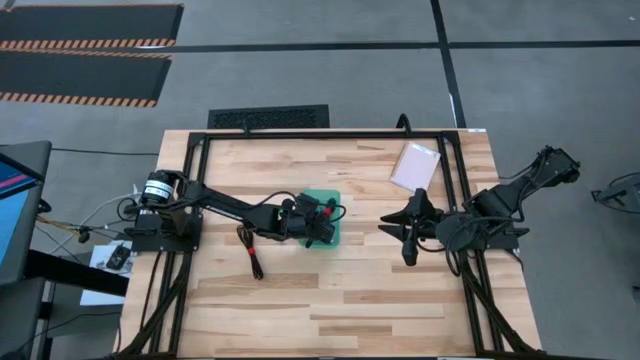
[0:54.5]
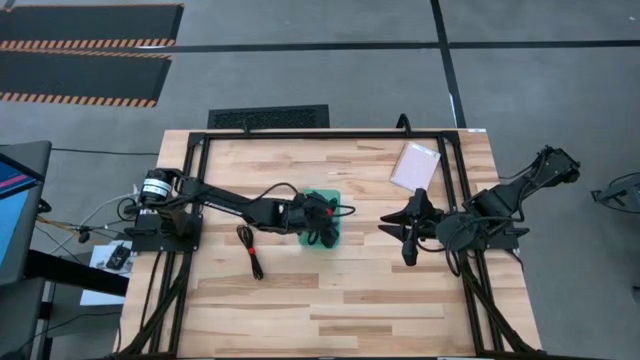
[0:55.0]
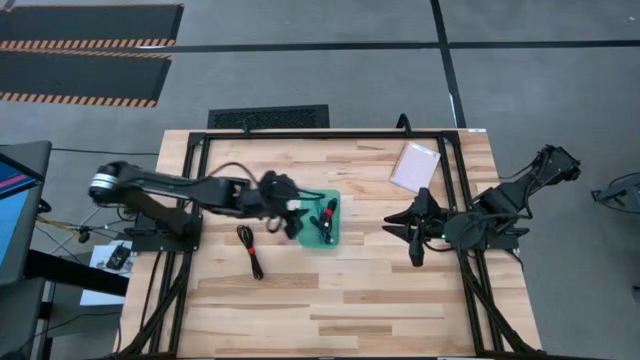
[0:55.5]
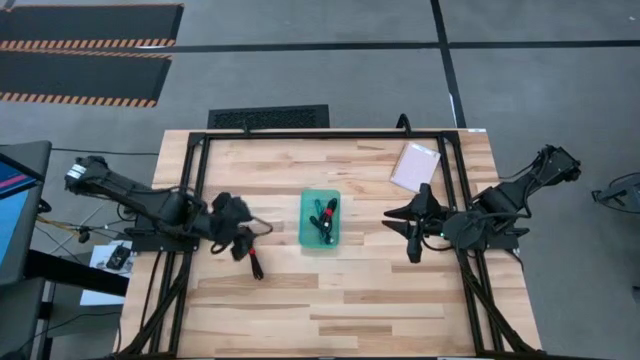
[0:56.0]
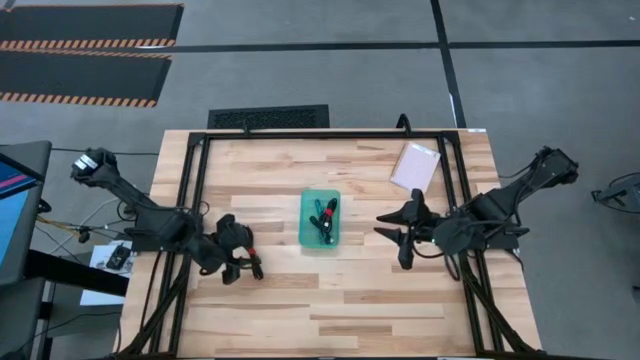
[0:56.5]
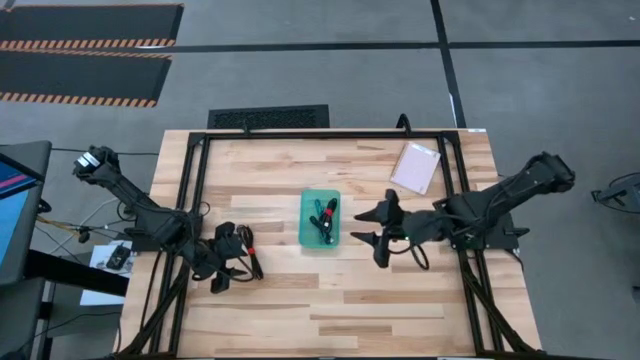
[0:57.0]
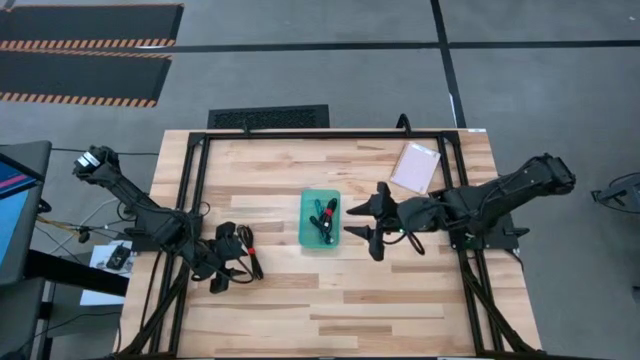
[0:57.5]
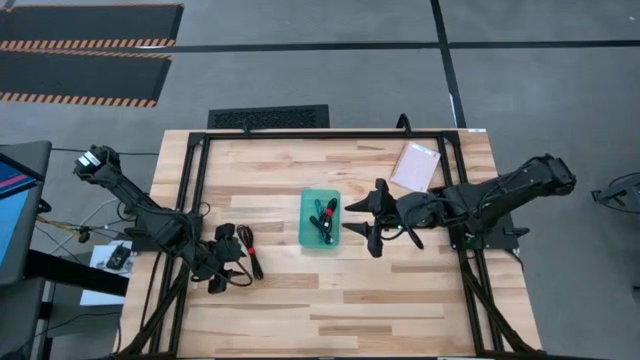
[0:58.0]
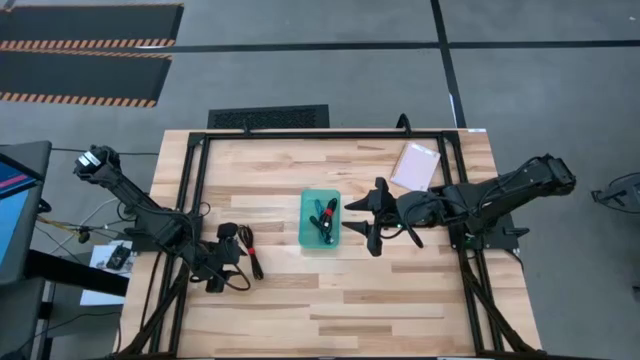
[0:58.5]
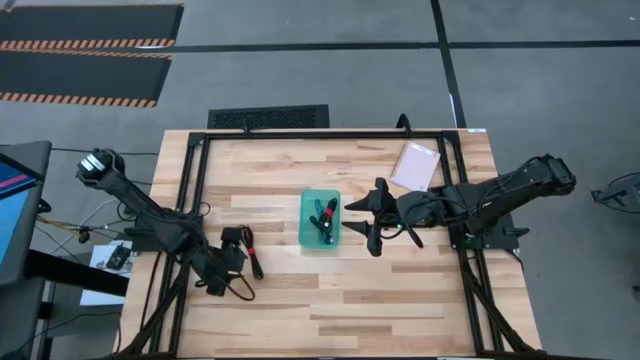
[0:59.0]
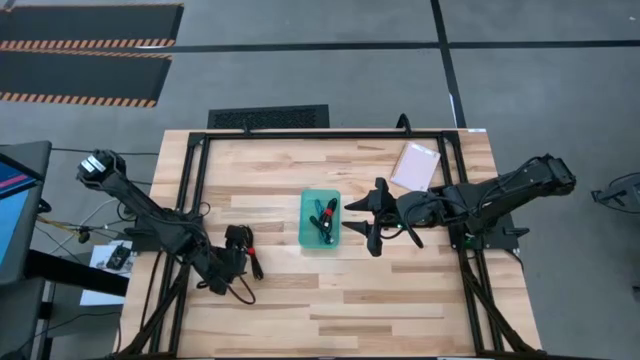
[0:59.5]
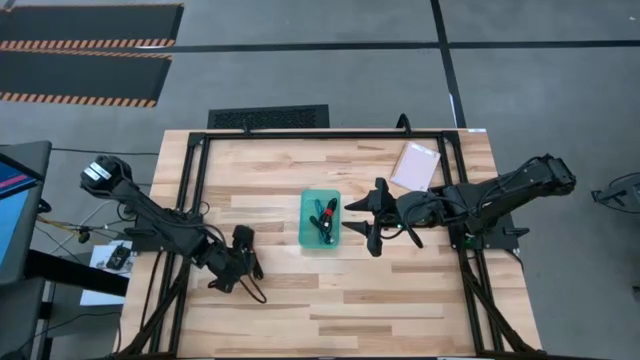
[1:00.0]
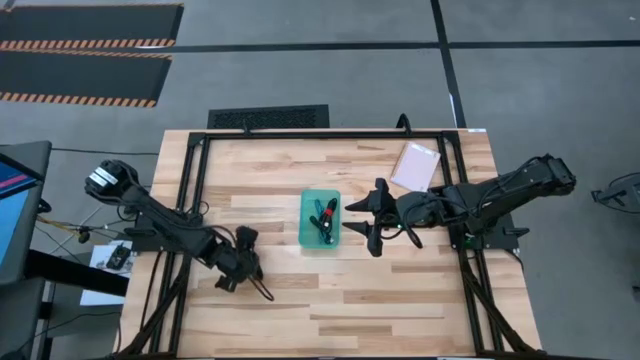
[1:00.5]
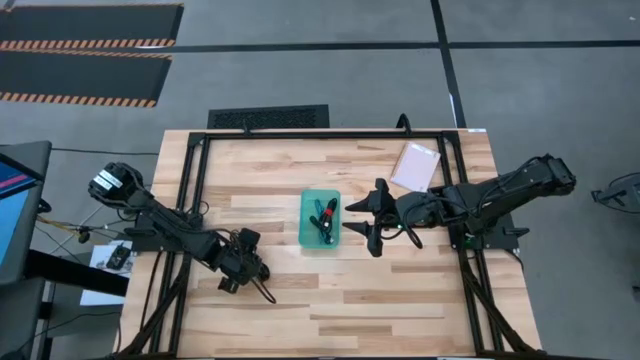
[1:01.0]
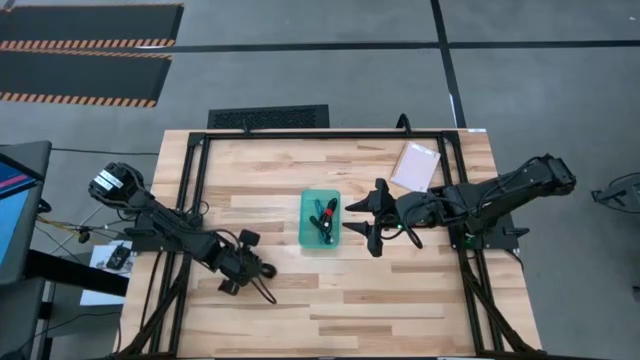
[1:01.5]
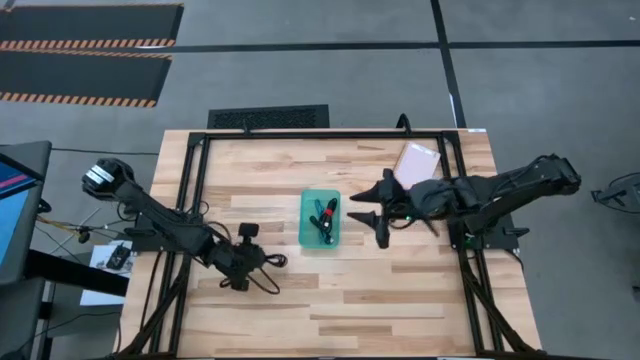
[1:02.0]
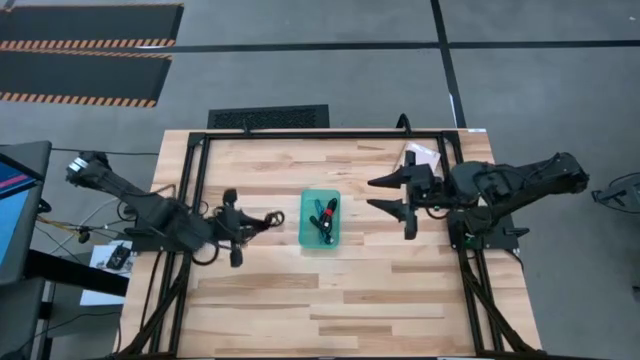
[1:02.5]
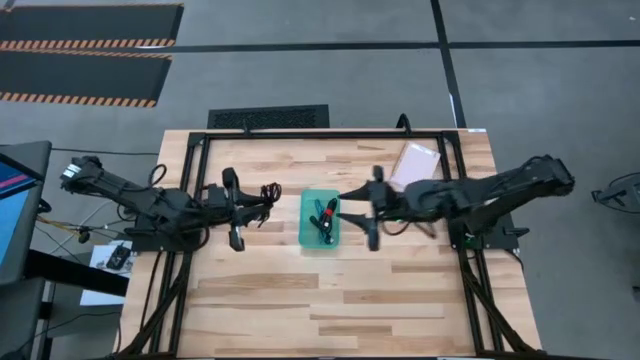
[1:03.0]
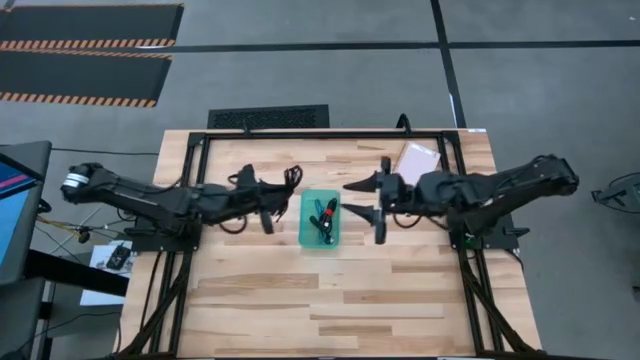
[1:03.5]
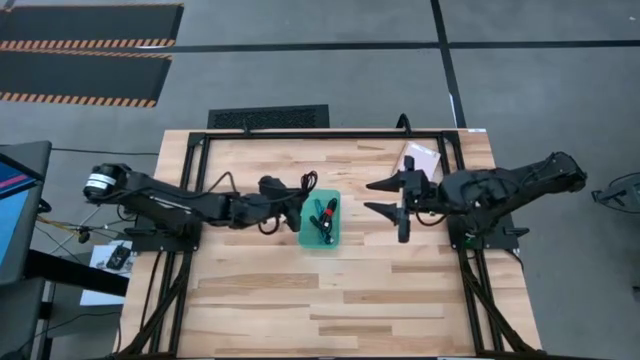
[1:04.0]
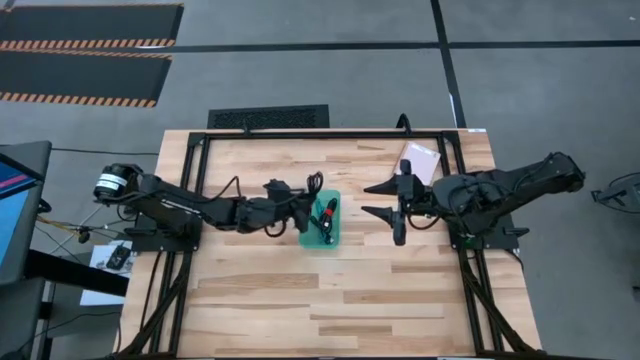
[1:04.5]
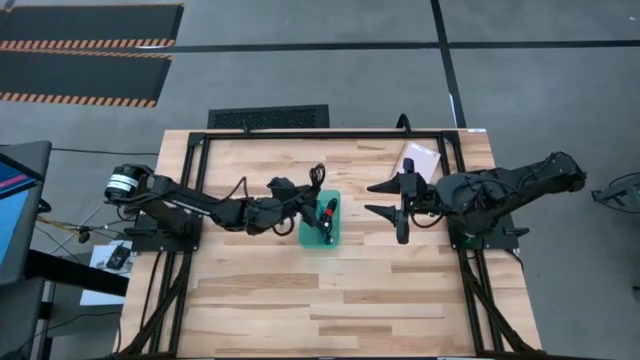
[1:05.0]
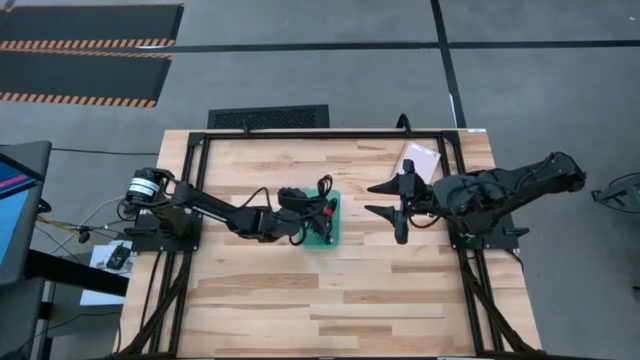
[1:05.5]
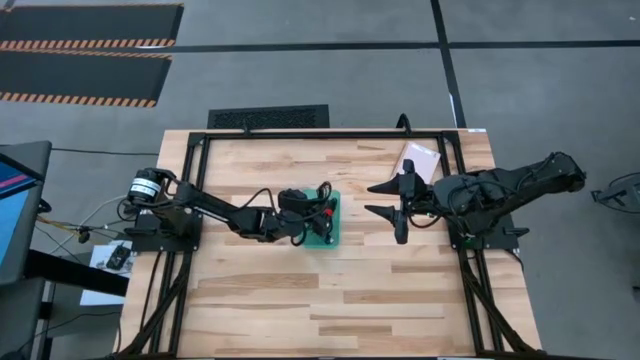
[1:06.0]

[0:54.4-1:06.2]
Task: Pick and place USB-C Cables
Put the black charger cable into the green bin

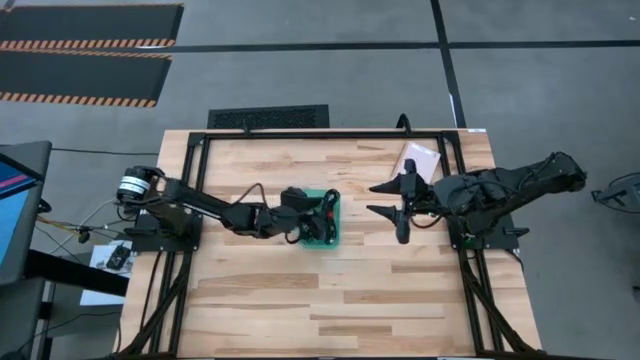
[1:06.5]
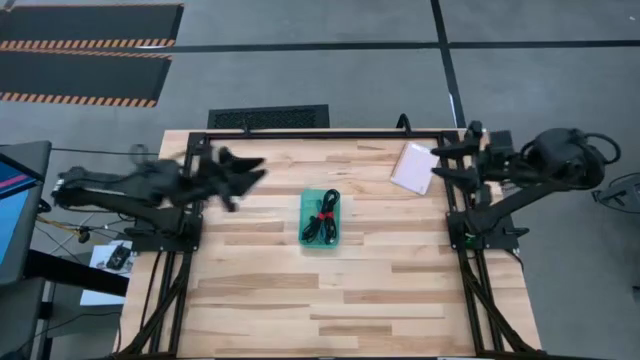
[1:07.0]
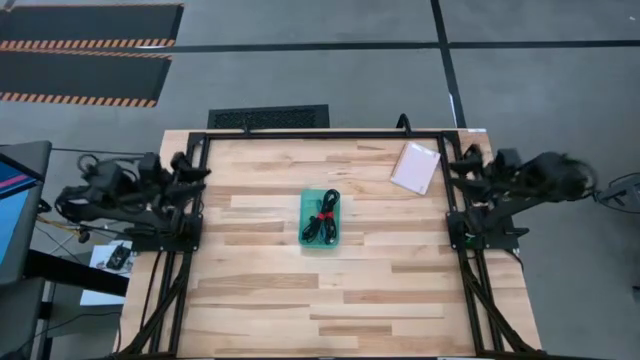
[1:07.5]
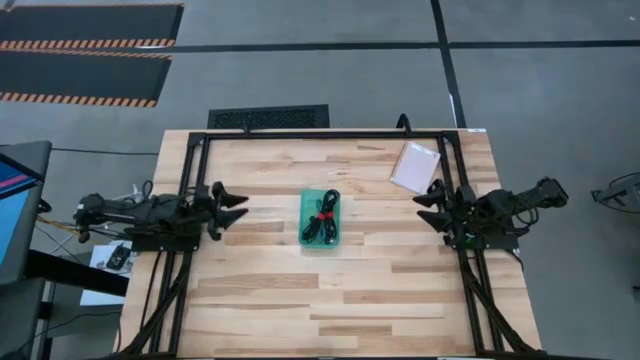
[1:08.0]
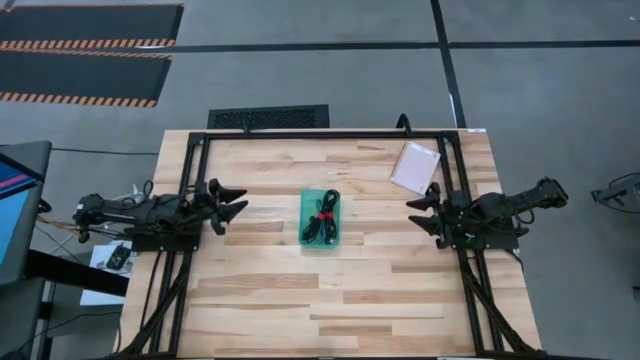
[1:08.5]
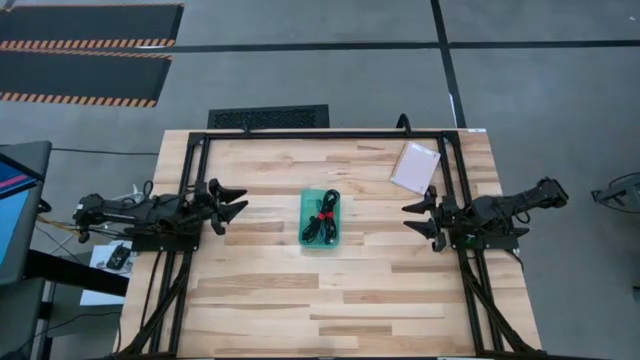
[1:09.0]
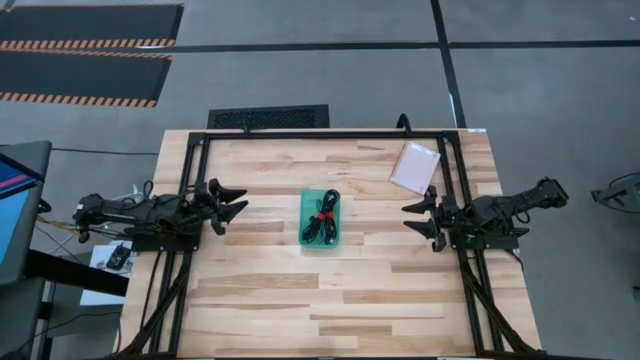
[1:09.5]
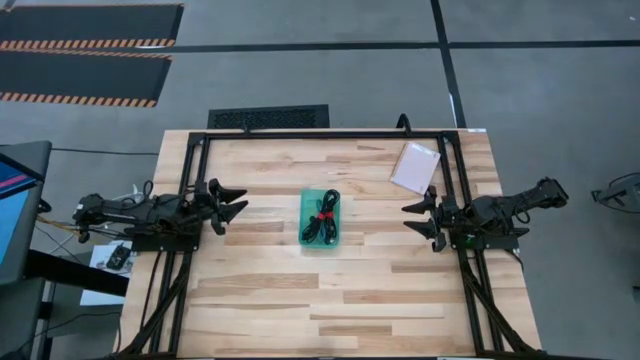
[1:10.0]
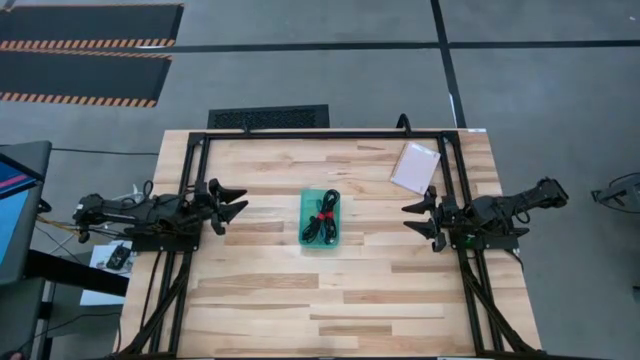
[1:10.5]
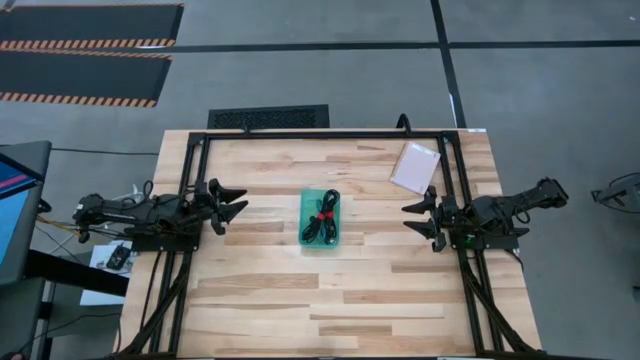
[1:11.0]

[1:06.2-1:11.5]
Return to Home Position

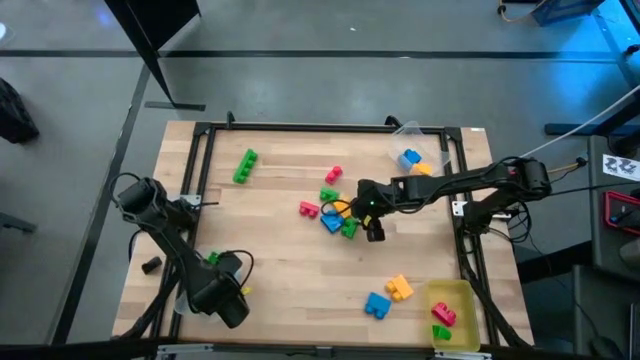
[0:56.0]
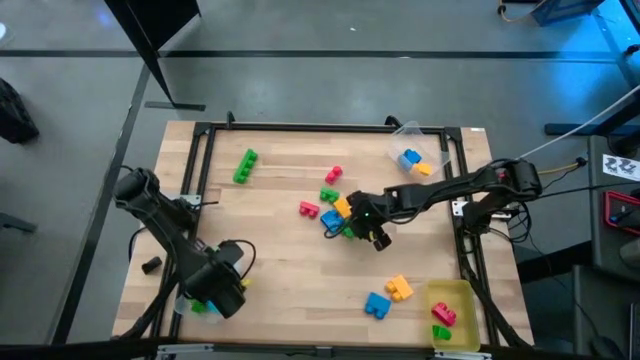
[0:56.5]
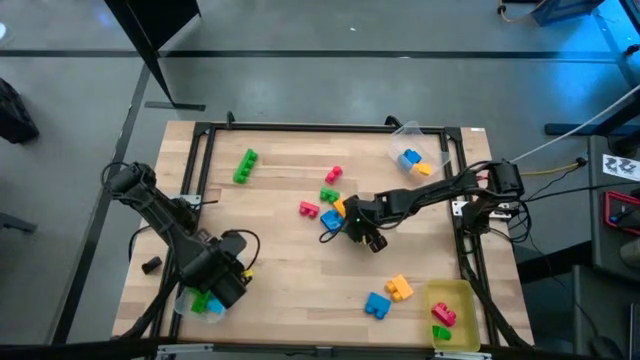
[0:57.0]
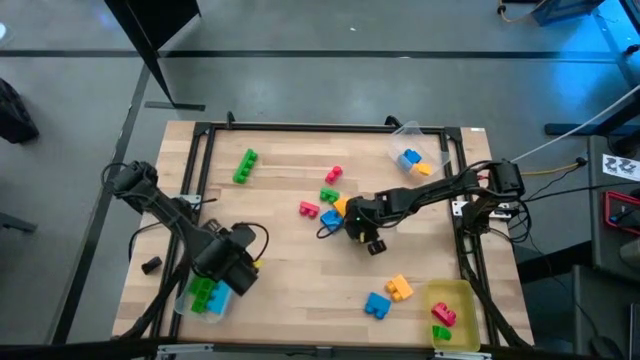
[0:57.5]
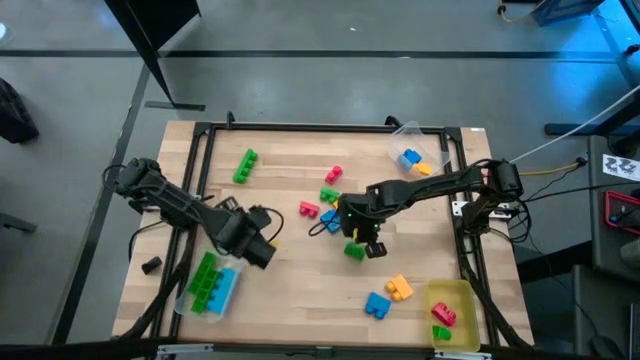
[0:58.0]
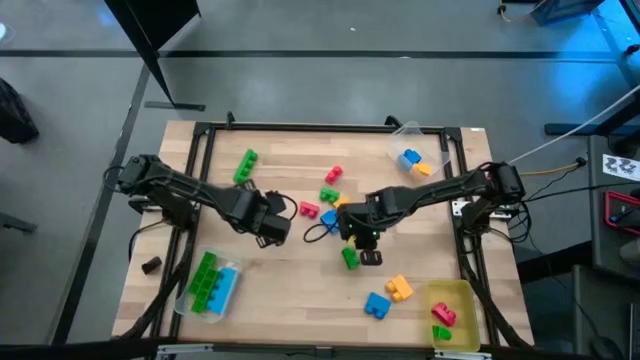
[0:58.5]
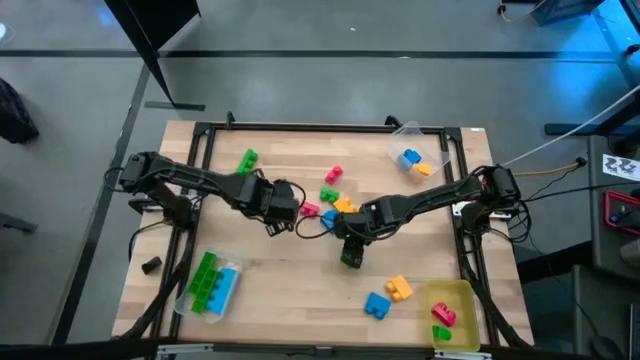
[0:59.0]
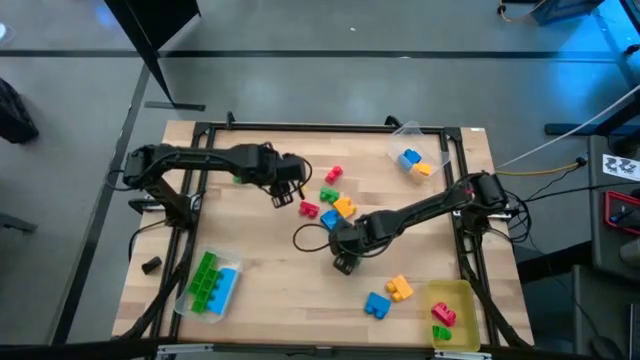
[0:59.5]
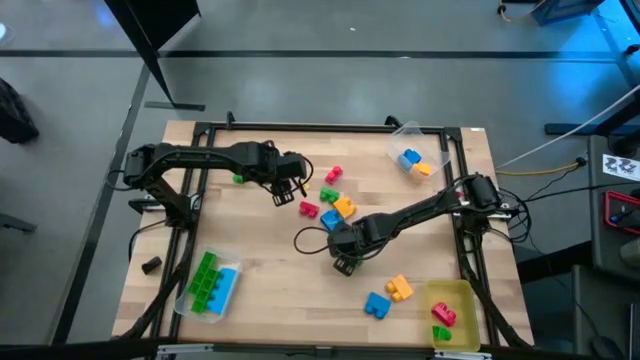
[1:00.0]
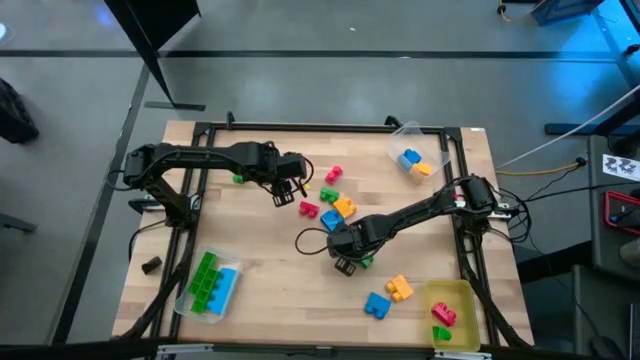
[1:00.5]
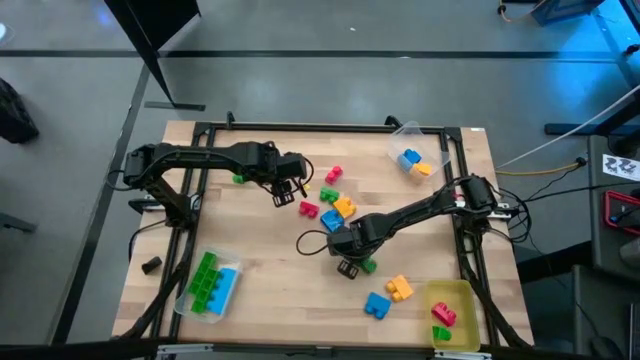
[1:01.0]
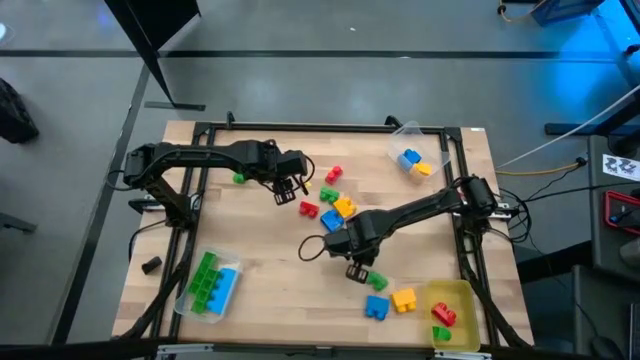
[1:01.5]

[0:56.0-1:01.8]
Task: Sort blocks by size
Put the bottom 2 stud green game piece into the yellow transparent bin
